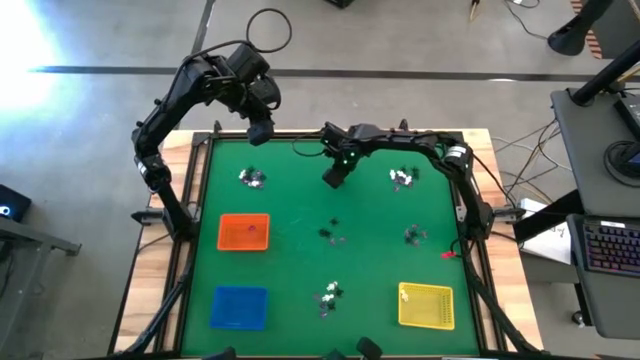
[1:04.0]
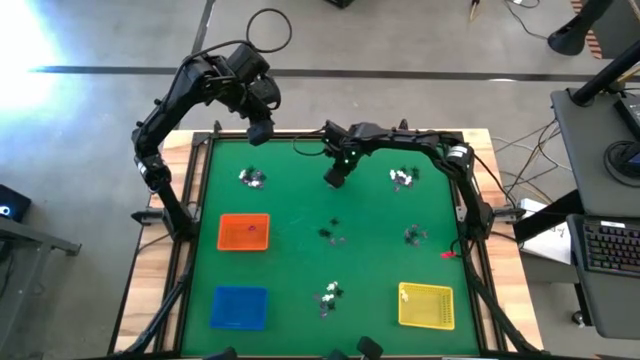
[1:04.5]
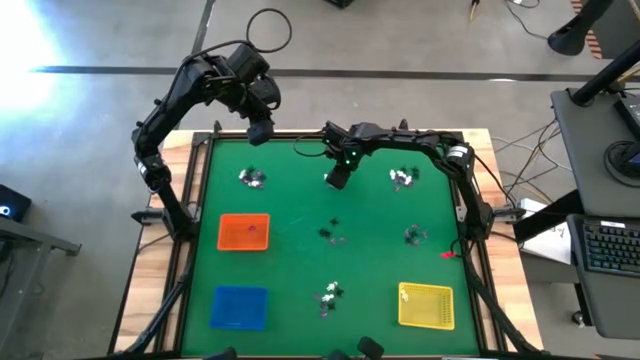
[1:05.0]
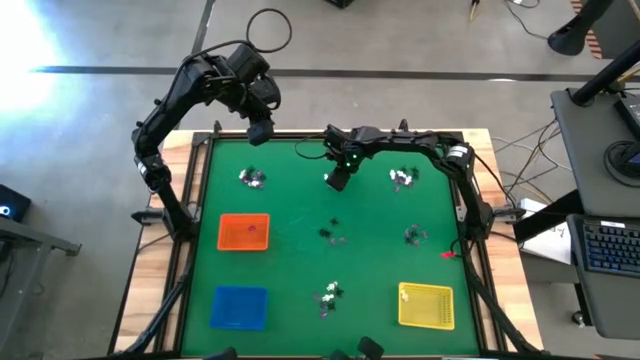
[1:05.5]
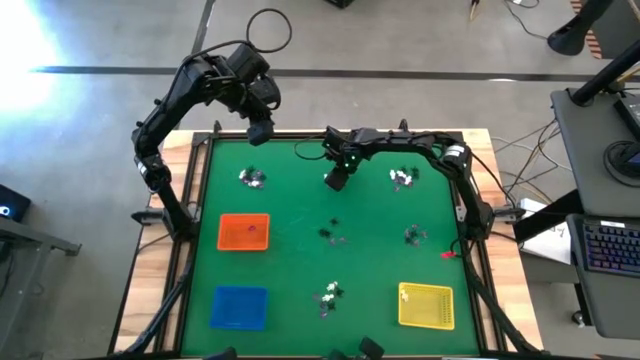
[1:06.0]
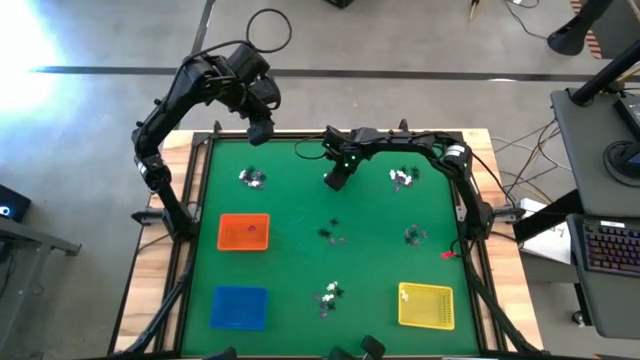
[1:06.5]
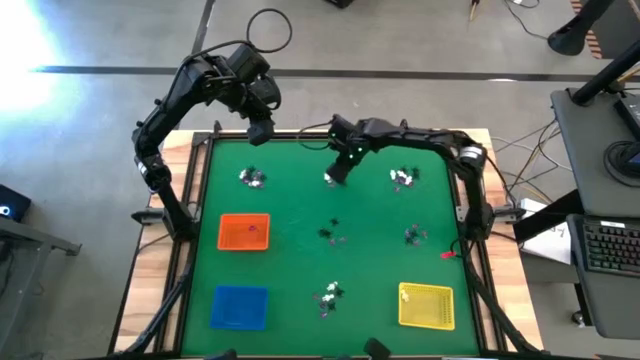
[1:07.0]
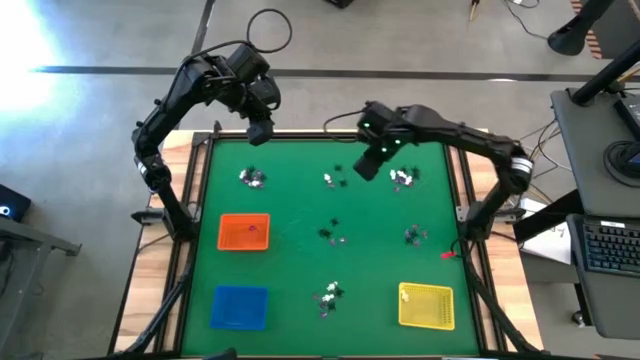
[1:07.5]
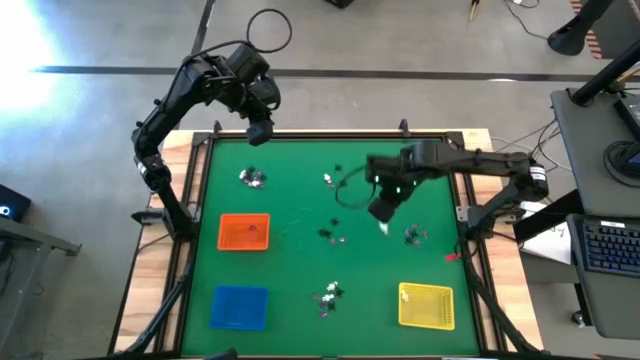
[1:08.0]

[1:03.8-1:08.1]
Task: Sort Halloween decoration
Put the white skeleton toy into the yellow bin

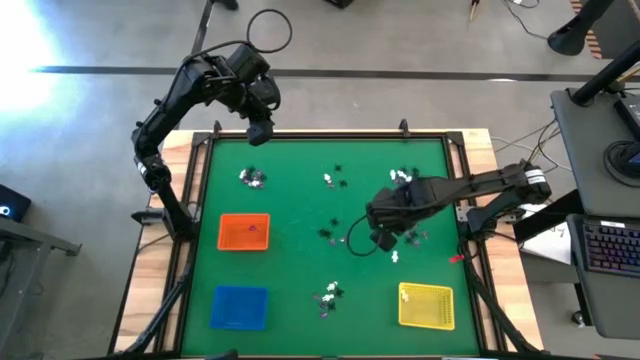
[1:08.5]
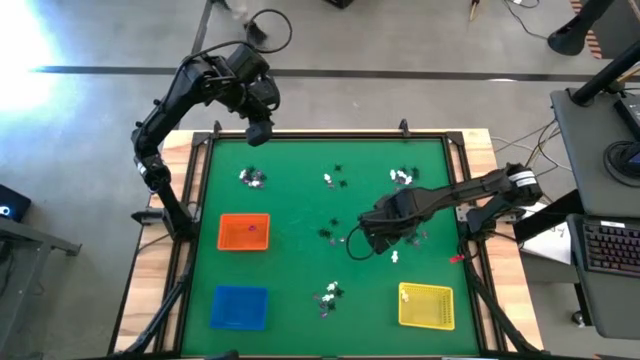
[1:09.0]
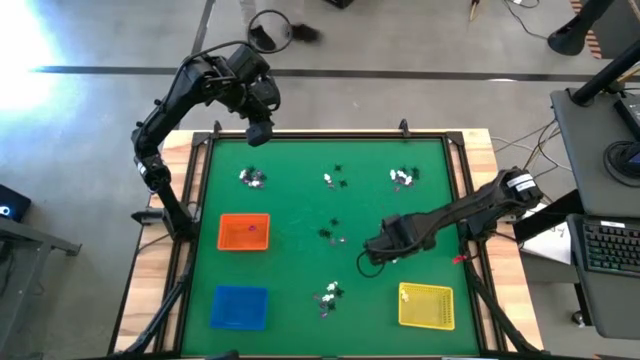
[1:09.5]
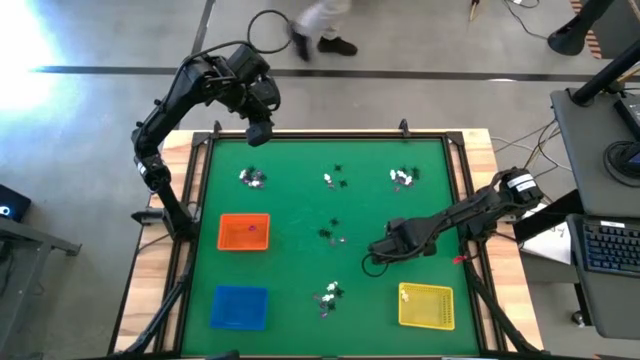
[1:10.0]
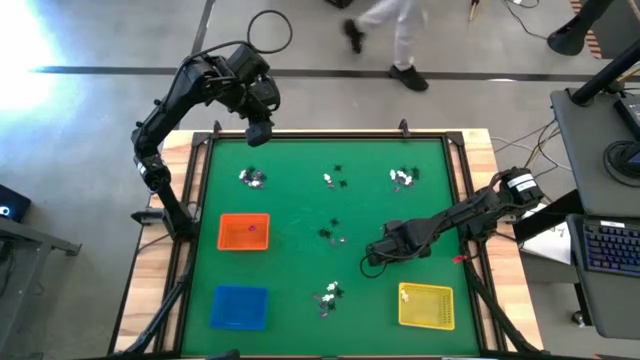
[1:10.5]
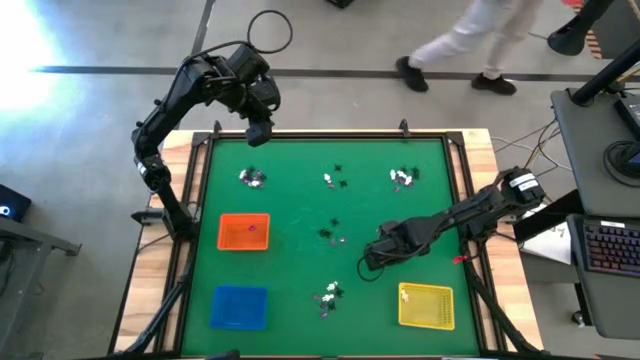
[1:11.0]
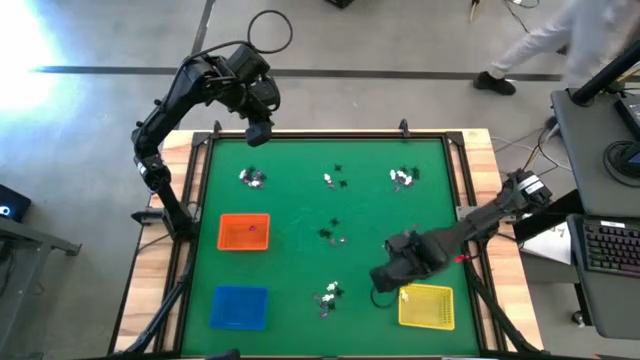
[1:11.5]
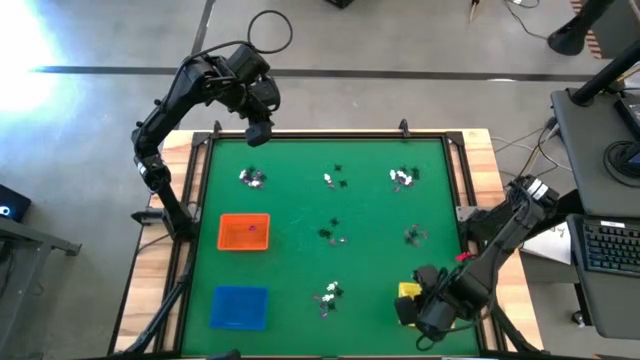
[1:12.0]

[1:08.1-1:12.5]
Put the white skeleton toy into the yellow bin

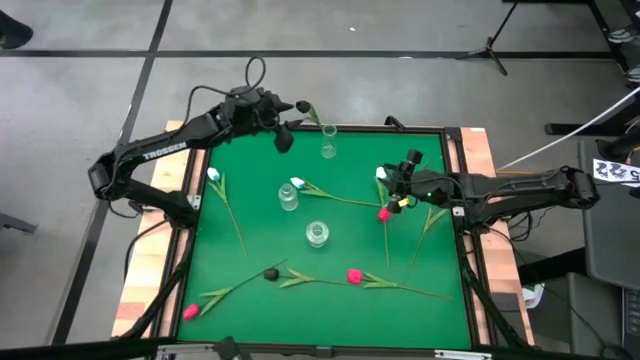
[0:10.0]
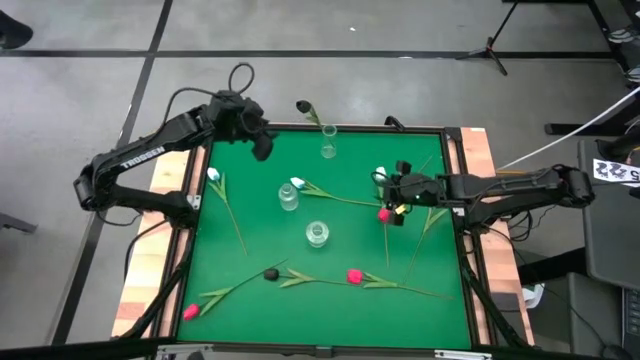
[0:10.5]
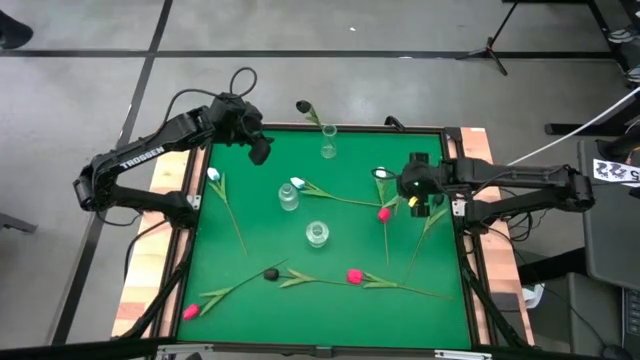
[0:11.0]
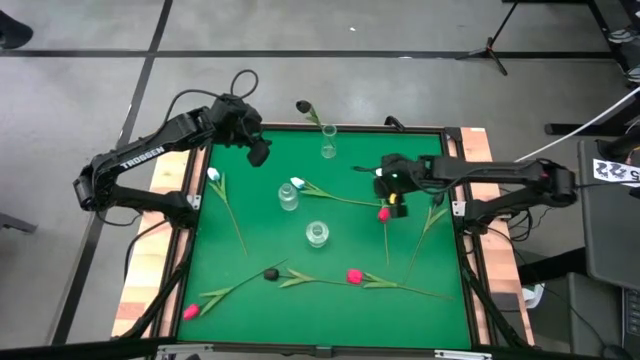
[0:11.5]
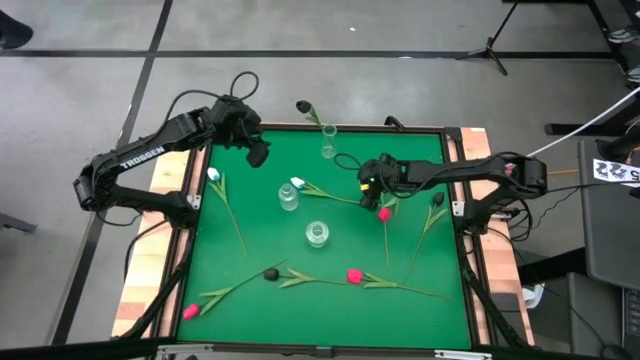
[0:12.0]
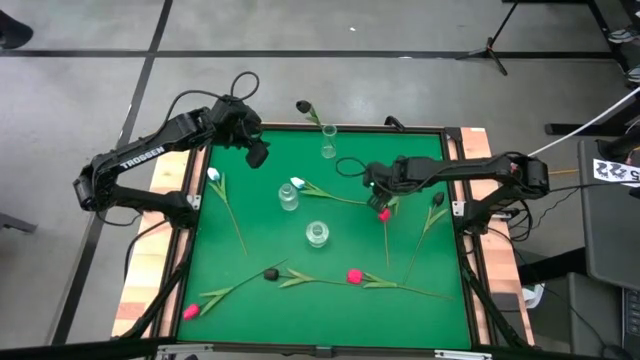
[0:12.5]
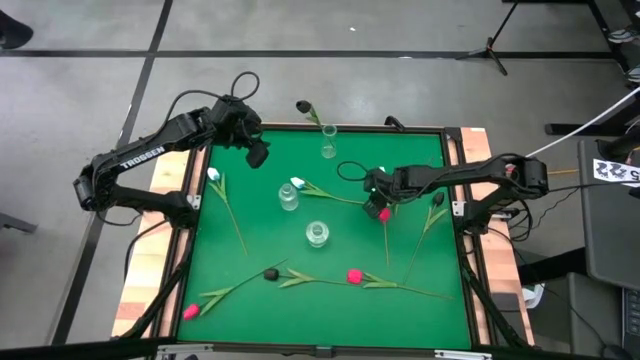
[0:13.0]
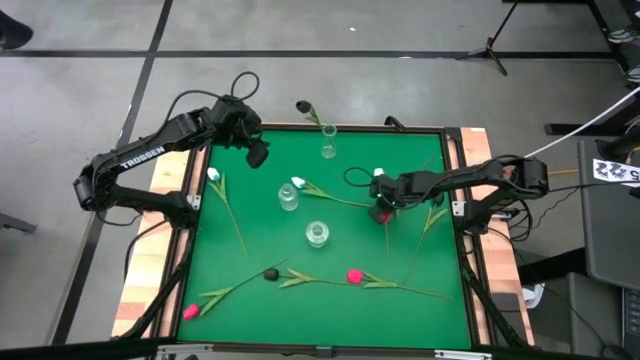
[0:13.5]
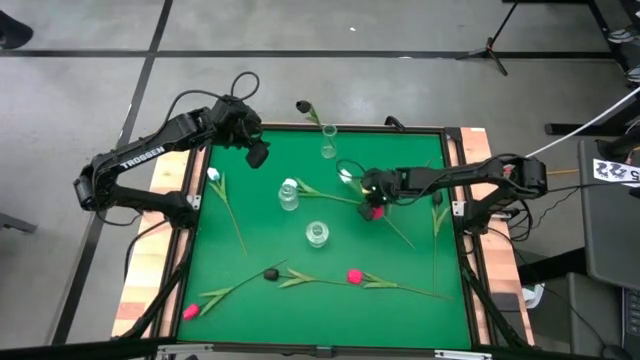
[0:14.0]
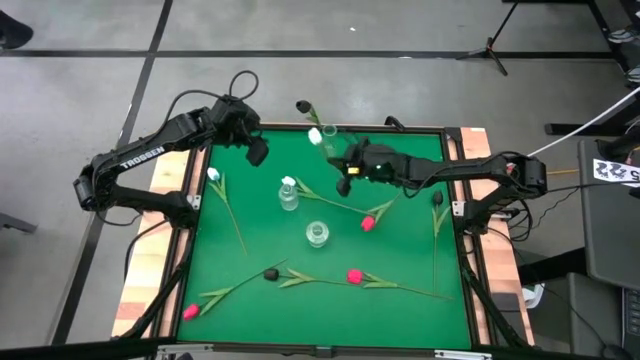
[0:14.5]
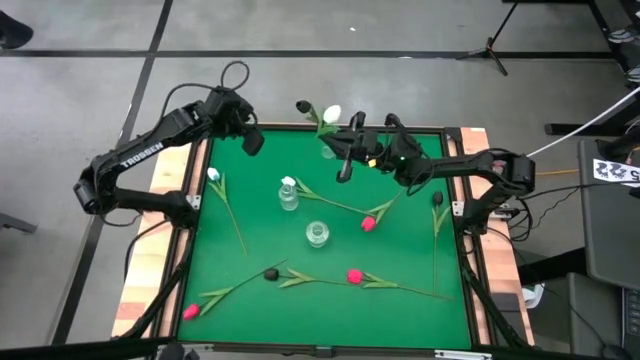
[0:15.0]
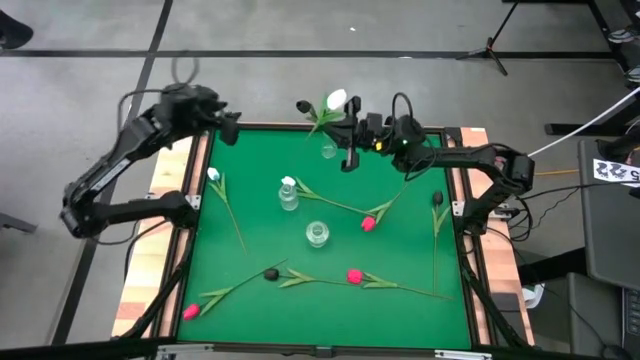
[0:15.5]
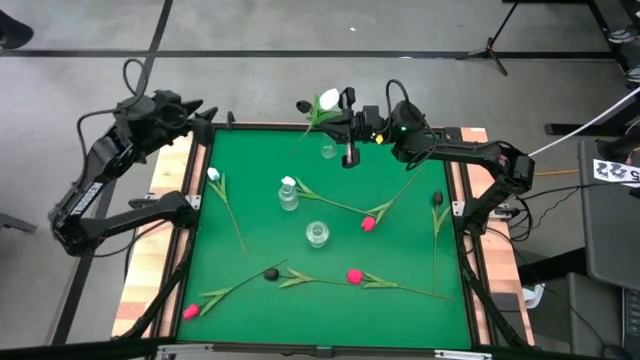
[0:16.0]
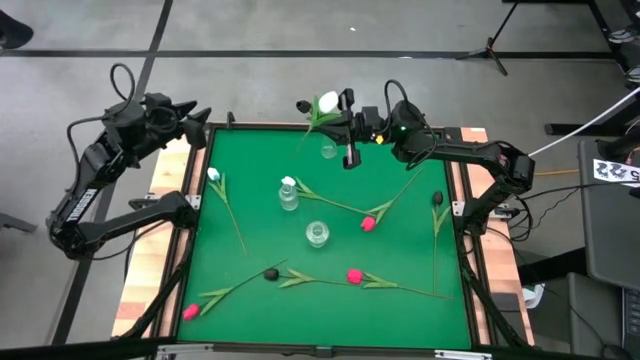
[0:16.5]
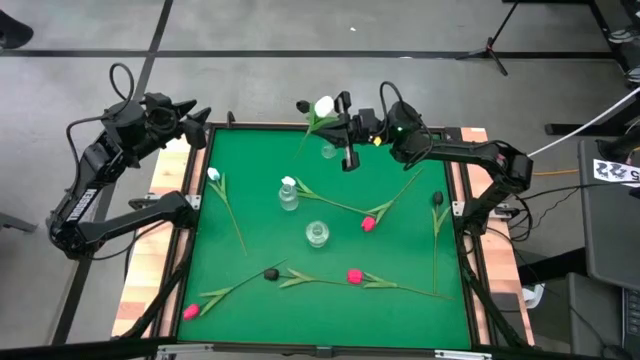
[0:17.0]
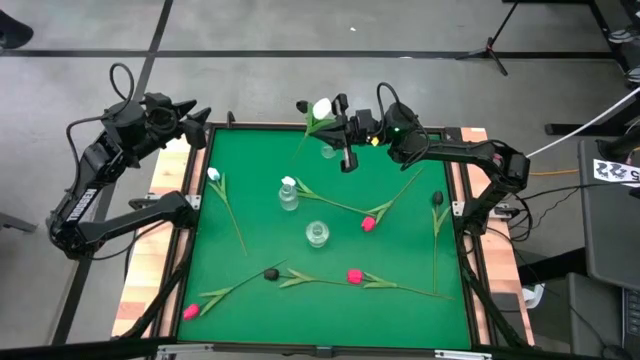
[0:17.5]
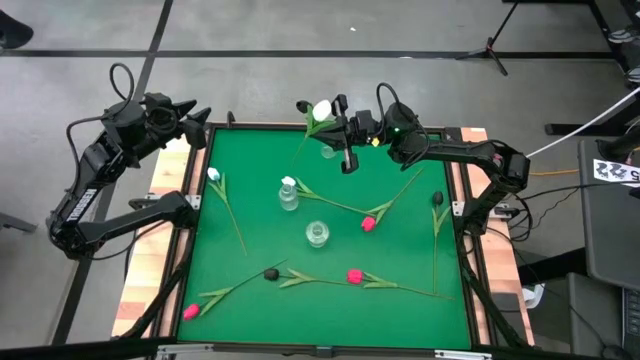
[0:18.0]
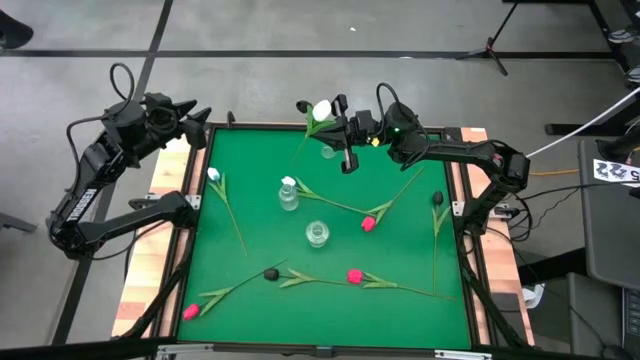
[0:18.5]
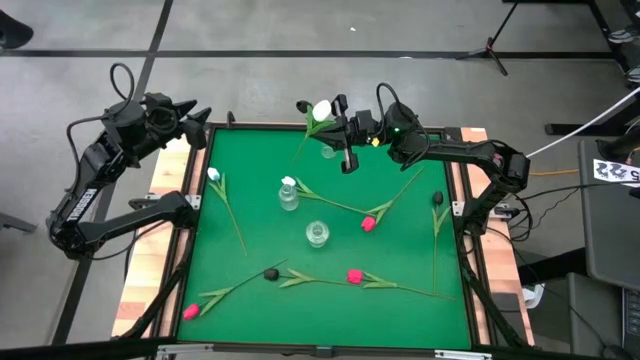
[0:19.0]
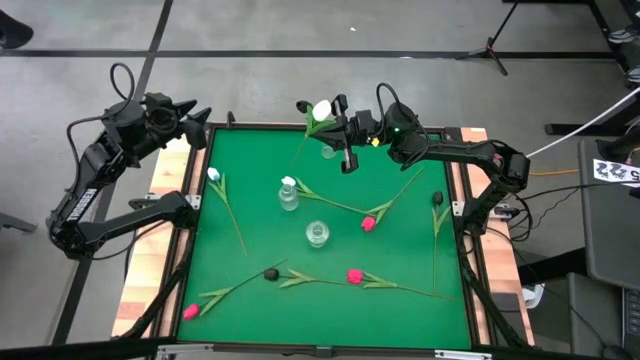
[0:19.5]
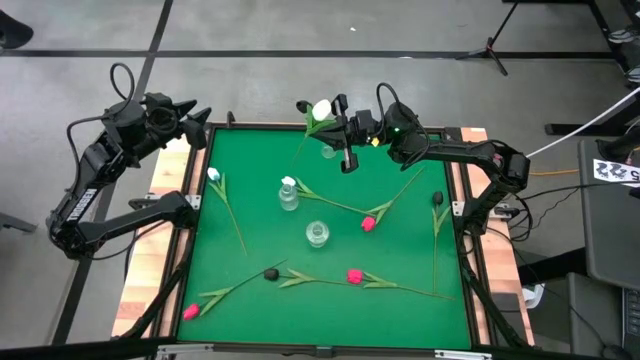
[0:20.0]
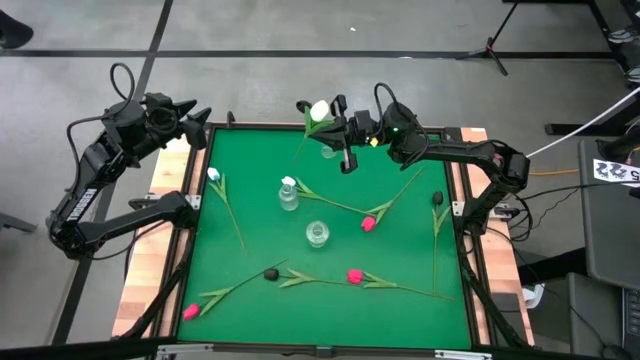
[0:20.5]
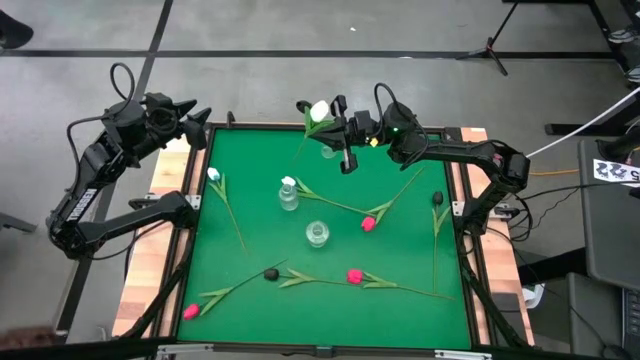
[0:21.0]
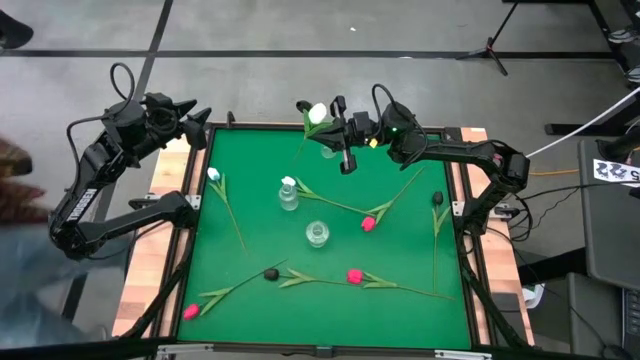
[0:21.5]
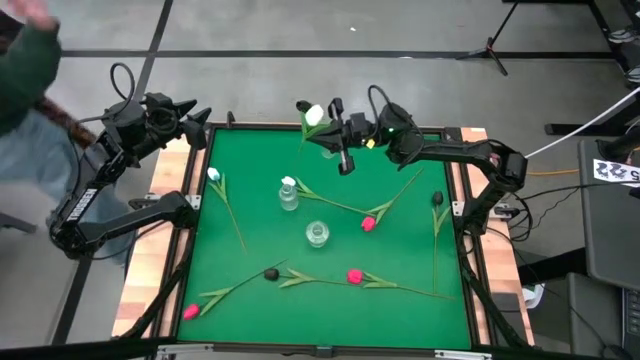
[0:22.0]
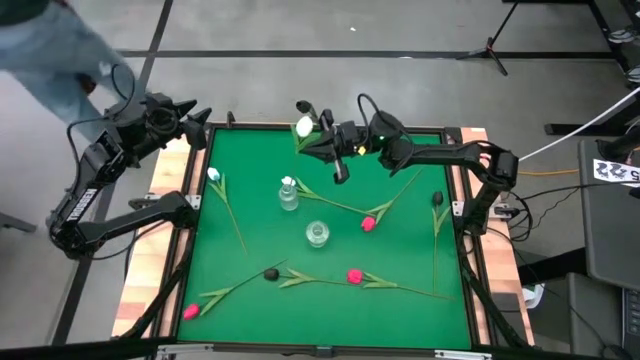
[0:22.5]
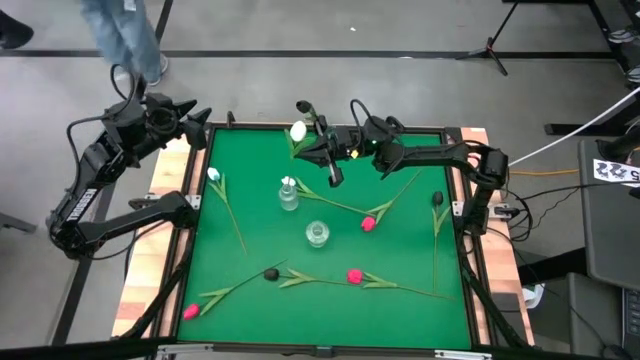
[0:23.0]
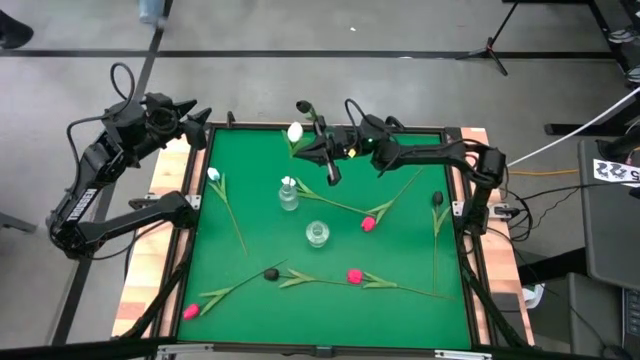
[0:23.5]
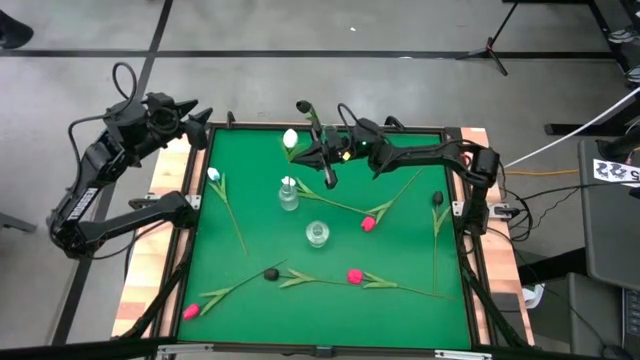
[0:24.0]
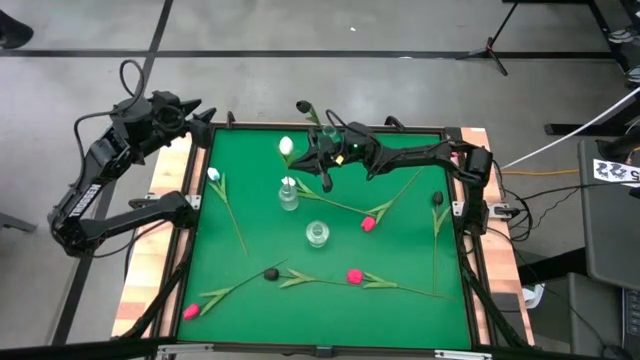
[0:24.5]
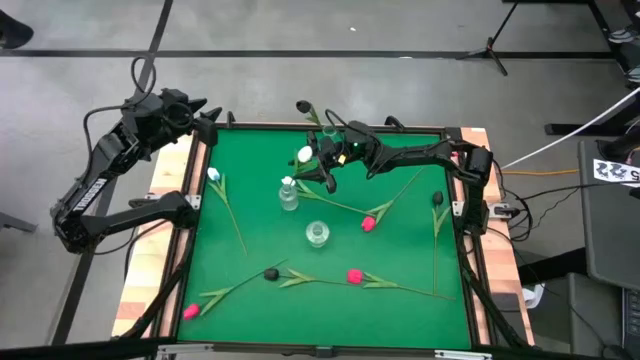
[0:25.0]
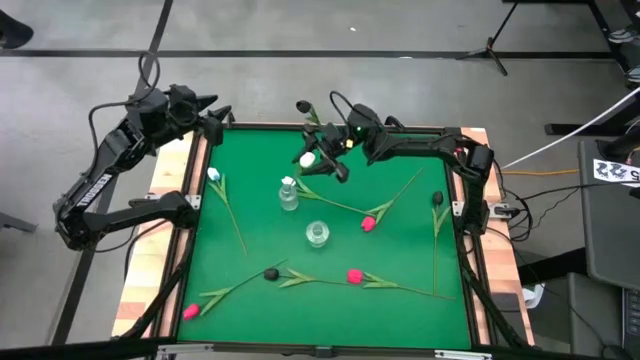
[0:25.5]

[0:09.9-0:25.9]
Task: Sort flowers into vase by color
Put the right white flower into the middle transparent vase
